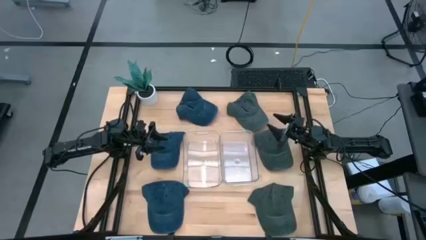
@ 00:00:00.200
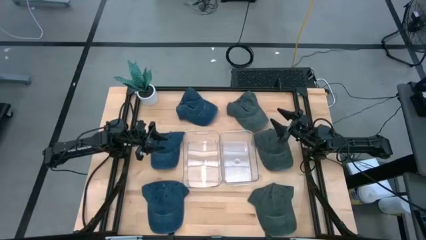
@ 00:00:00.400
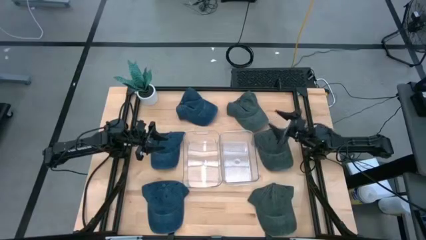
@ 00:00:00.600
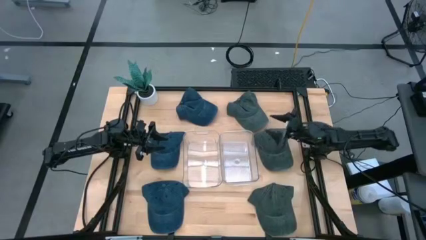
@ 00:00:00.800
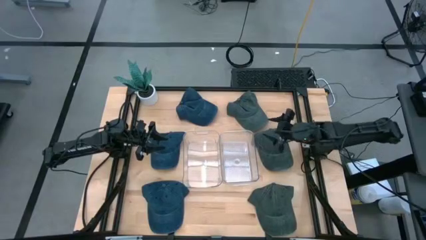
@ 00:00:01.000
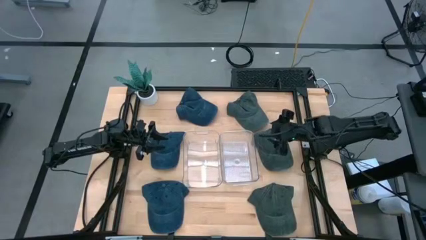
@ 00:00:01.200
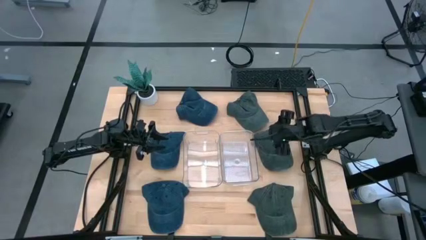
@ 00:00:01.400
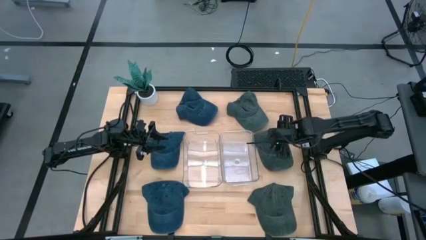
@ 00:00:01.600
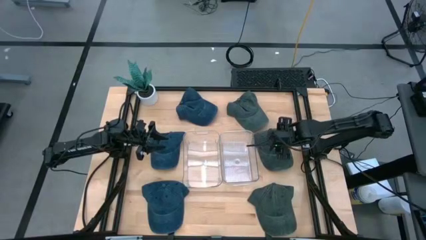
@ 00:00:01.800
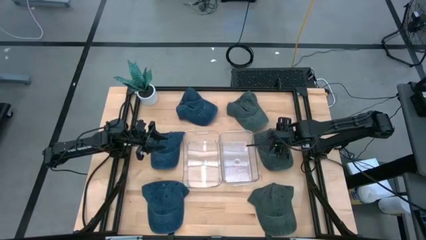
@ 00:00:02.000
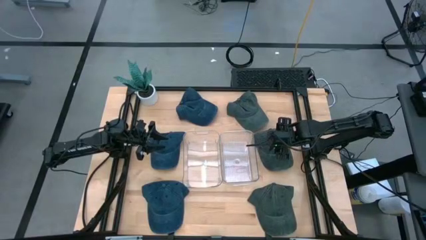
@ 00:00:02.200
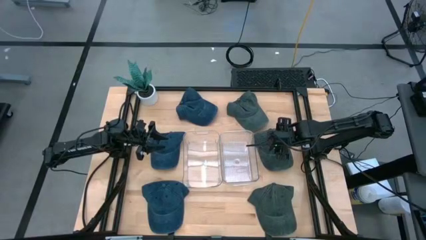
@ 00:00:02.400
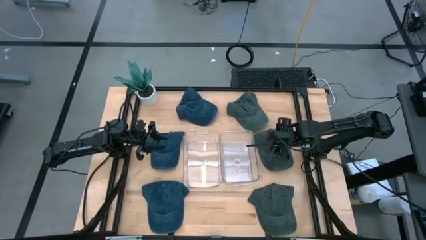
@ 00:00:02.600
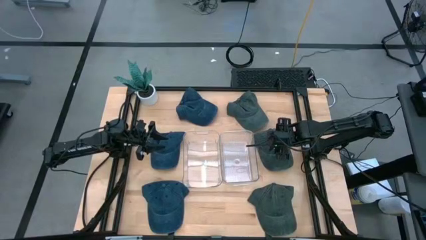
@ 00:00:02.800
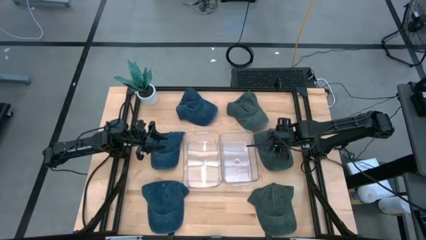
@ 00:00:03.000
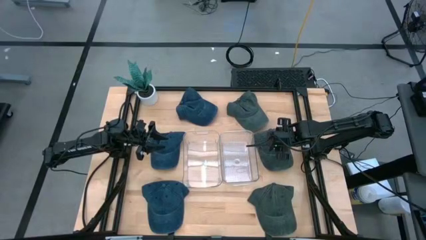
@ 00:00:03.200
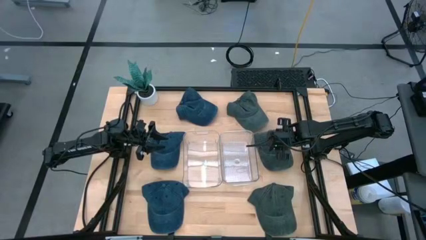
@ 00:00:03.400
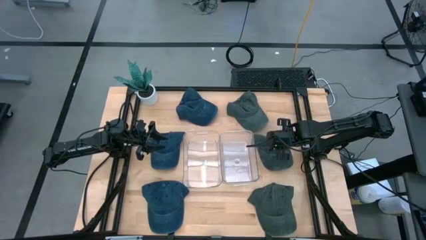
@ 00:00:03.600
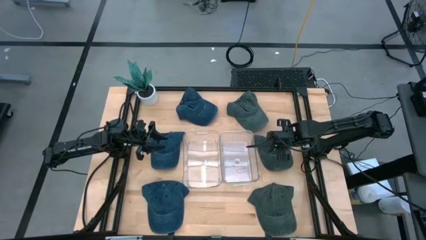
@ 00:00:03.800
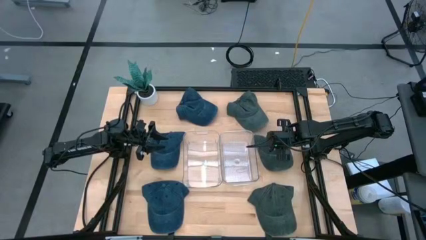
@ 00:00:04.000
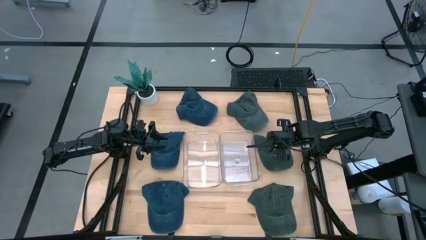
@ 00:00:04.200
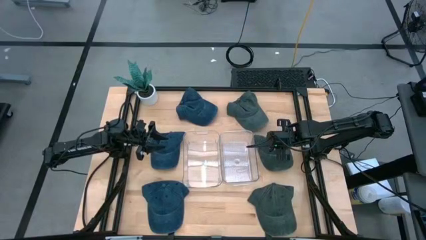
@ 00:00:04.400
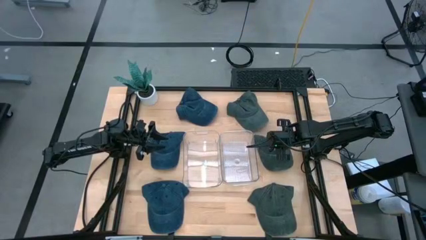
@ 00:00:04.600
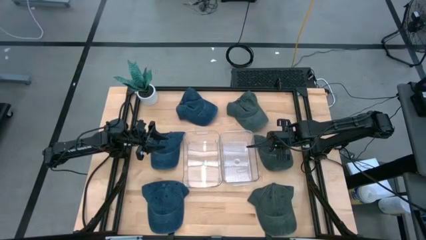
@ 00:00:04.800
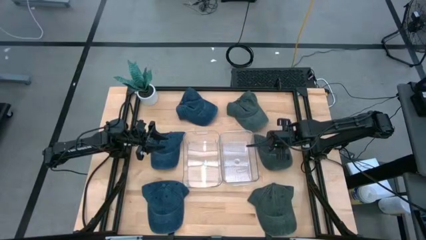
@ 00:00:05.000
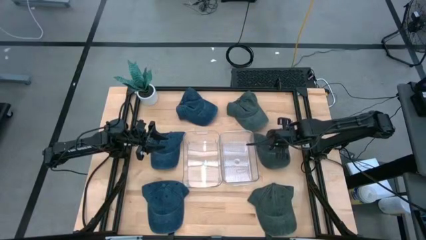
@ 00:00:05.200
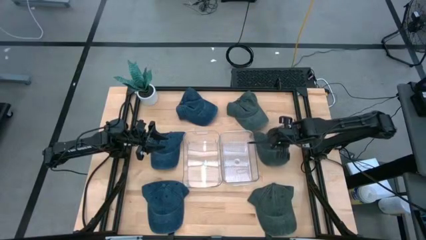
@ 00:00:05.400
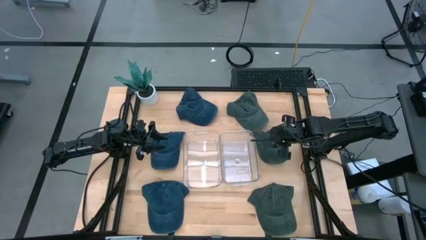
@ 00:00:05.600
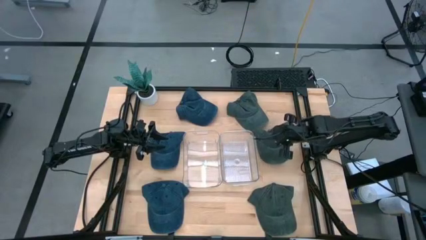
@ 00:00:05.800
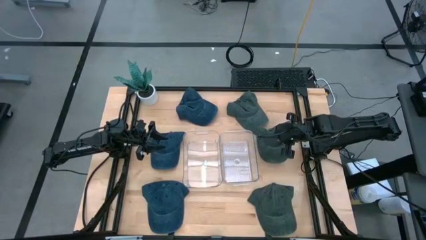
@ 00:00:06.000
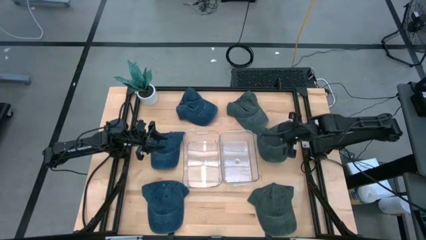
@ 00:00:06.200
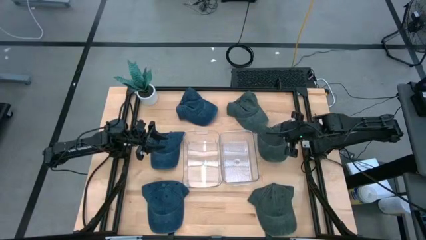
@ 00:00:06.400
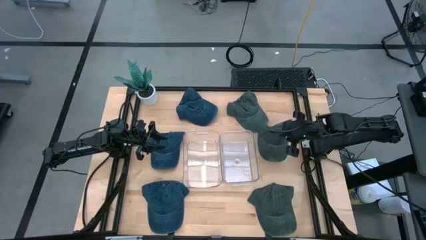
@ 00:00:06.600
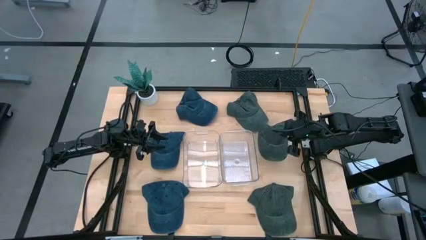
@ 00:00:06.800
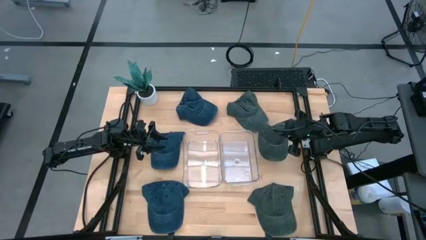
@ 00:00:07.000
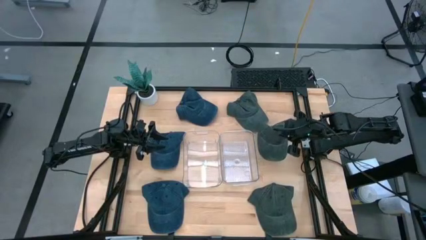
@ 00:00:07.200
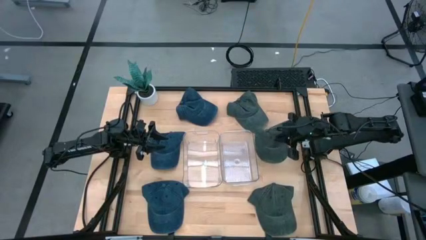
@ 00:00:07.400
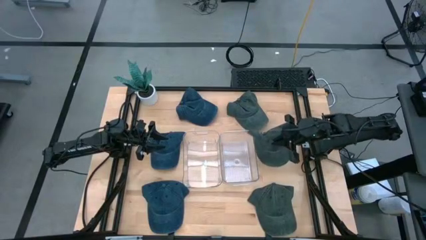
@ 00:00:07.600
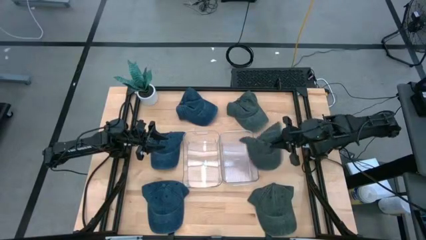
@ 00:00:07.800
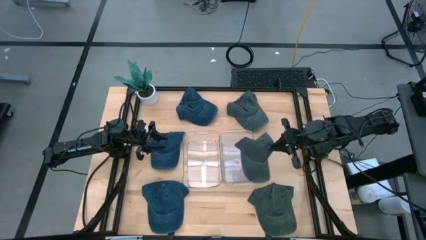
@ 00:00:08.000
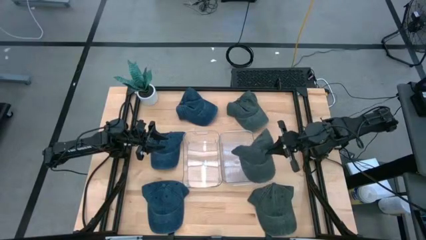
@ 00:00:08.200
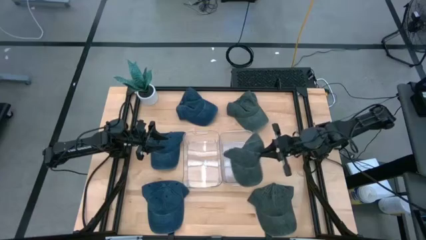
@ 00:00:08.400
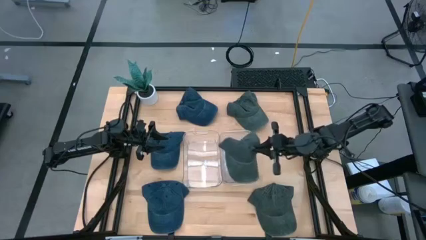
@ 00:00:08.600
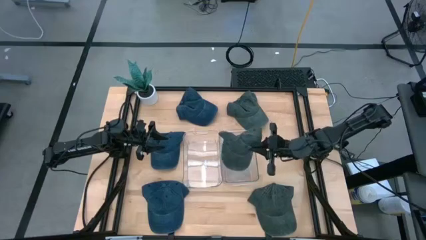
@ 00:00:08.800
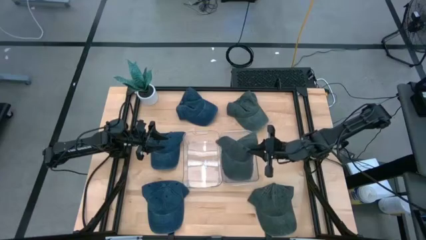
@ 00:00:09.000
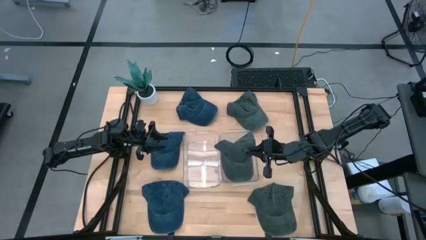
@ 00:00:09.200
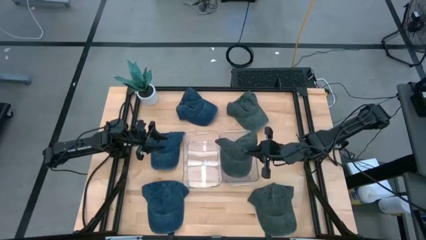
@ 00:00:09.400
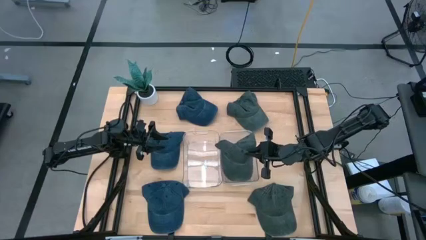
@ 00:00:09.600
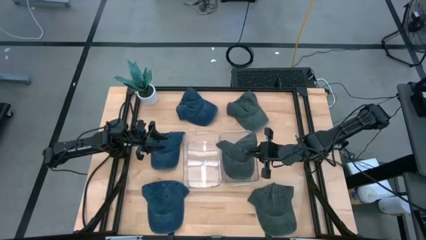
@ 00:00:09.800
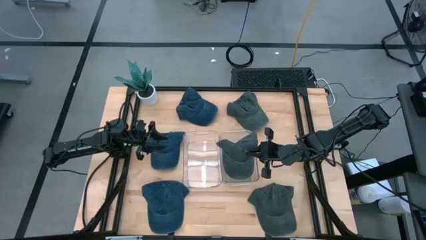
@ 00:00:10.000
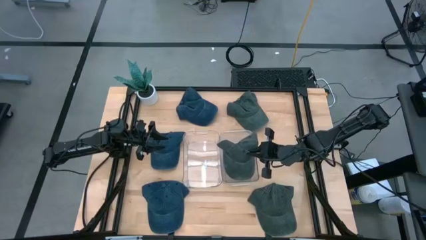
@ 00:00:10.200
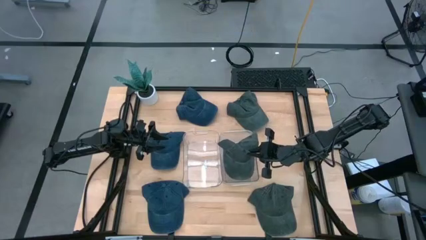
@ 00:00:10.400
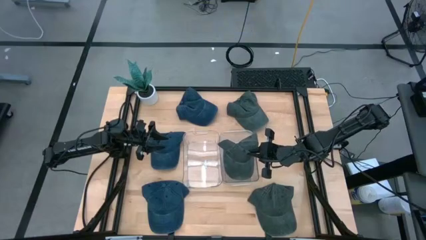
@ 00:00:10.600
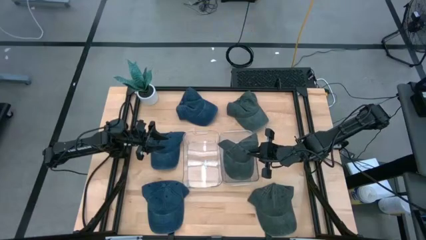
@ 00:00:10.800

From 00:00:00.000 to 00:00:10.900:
Task: Pick & Place hat
Put the middle gray cap into the right transparent bin
